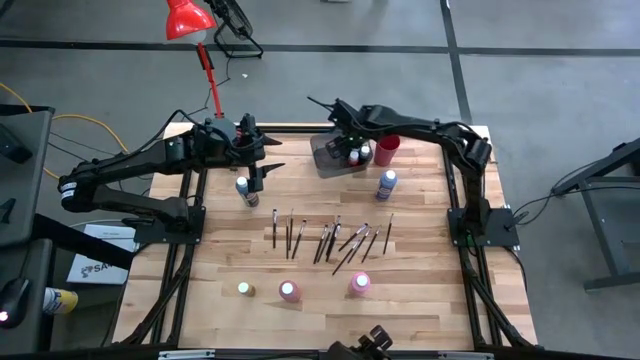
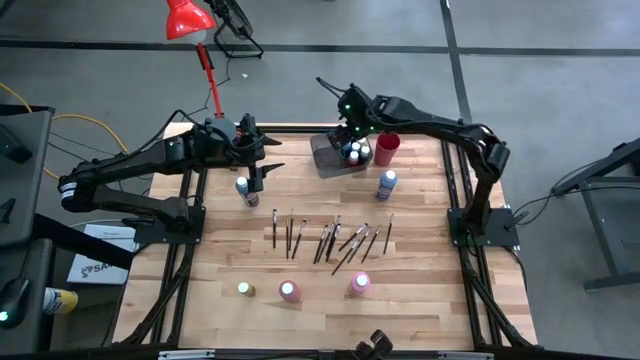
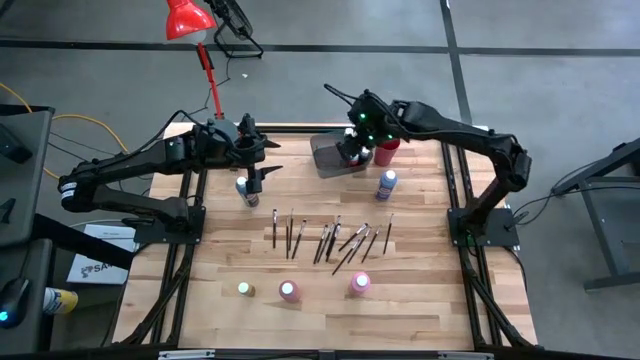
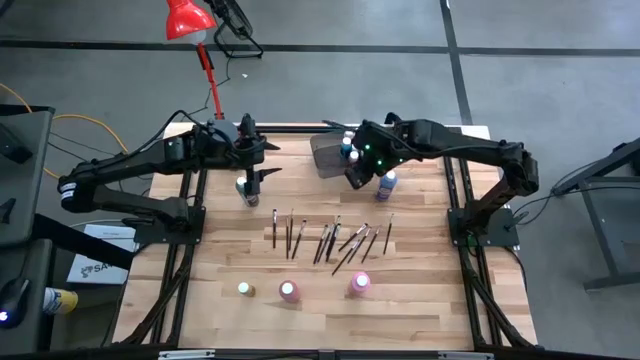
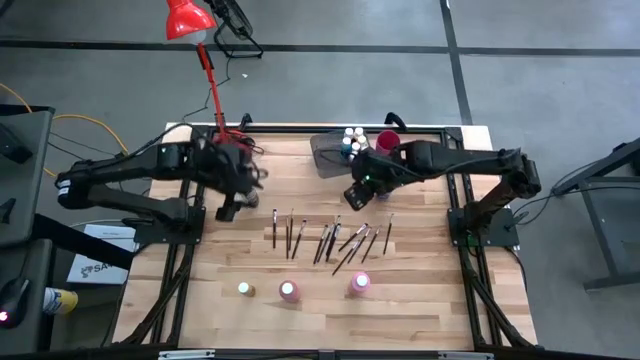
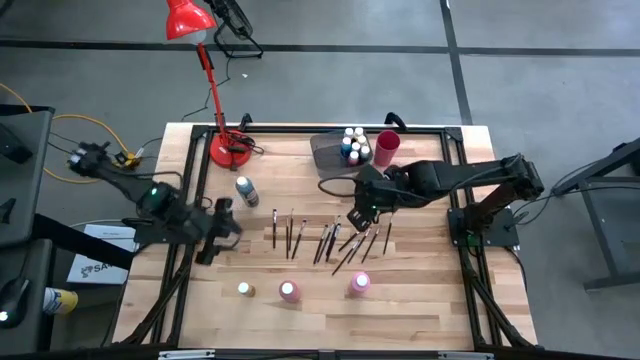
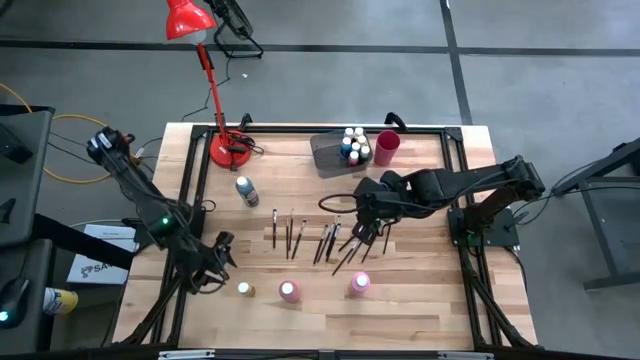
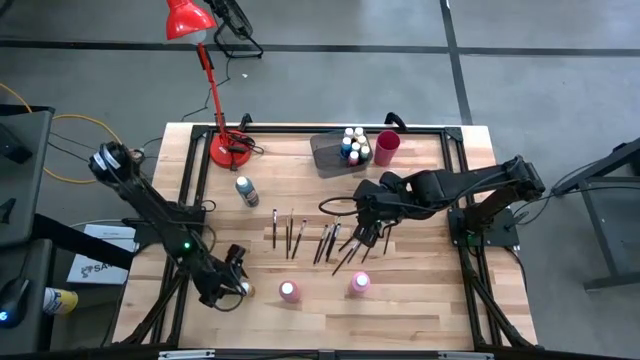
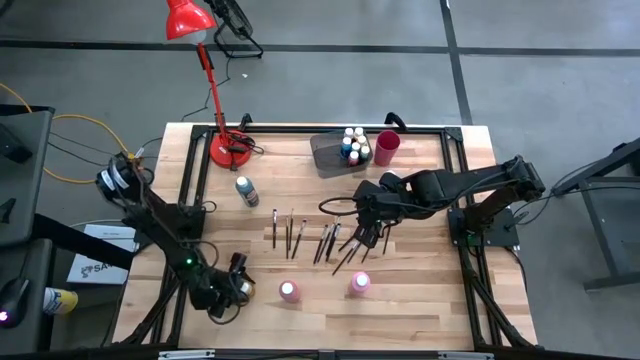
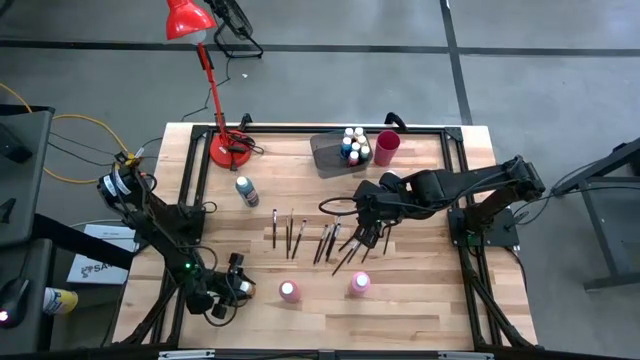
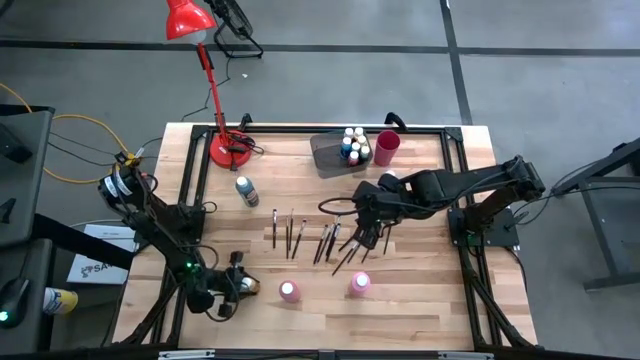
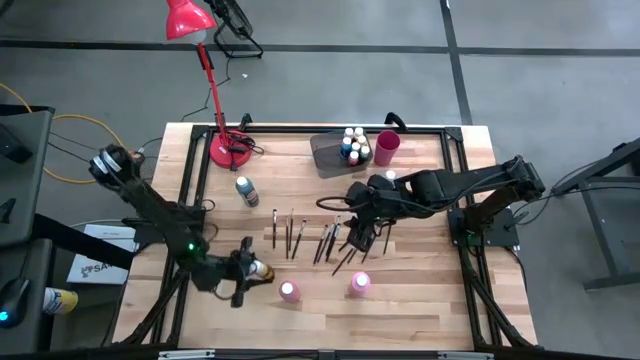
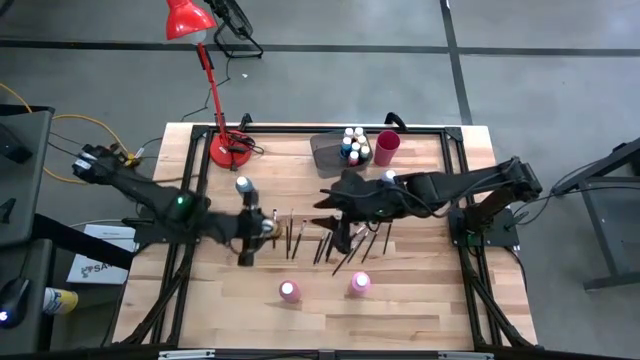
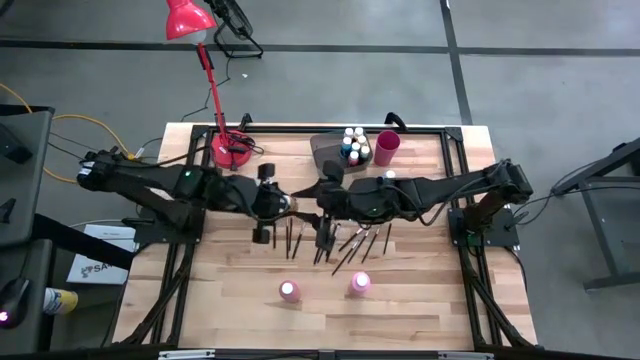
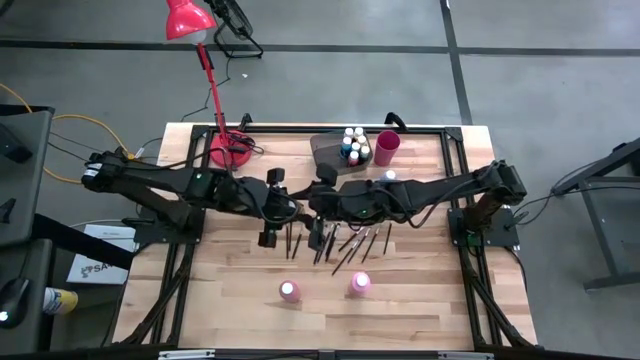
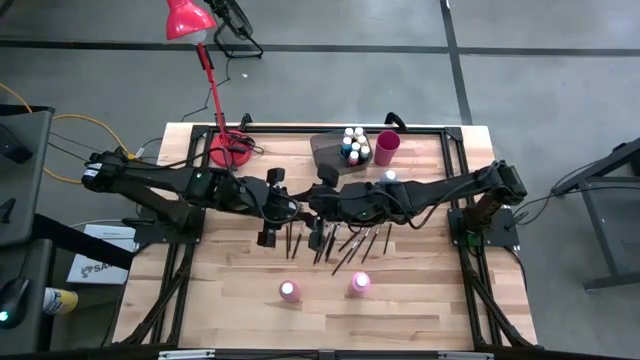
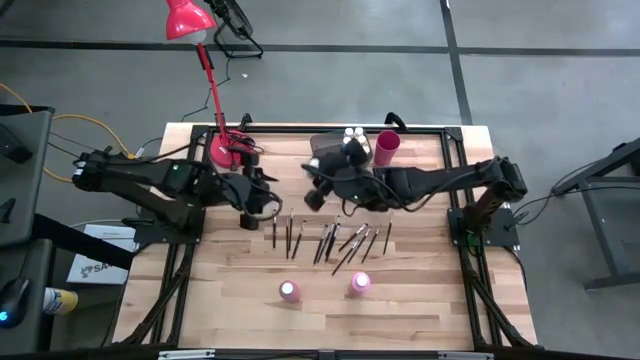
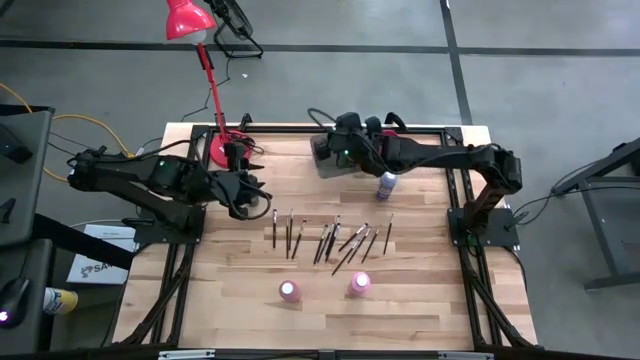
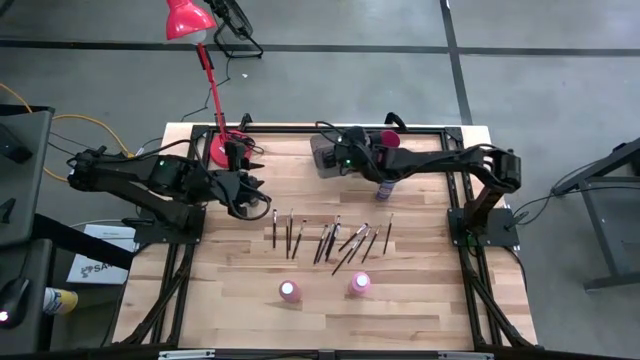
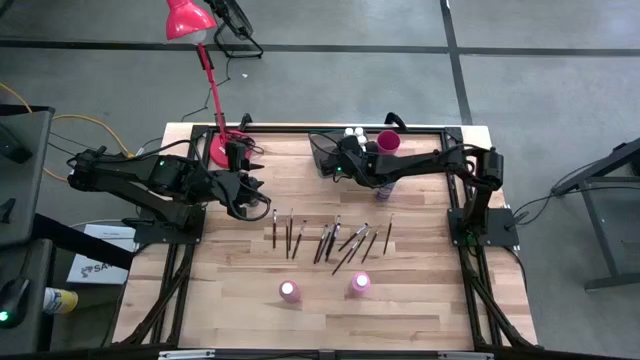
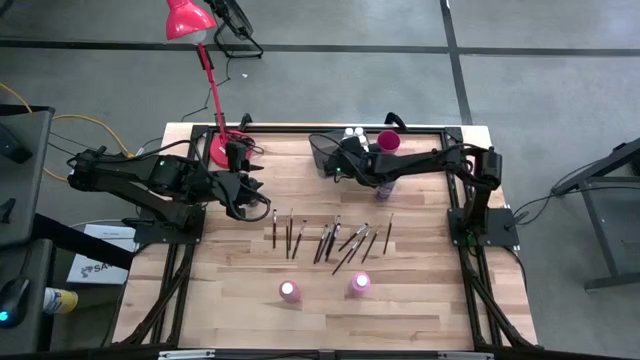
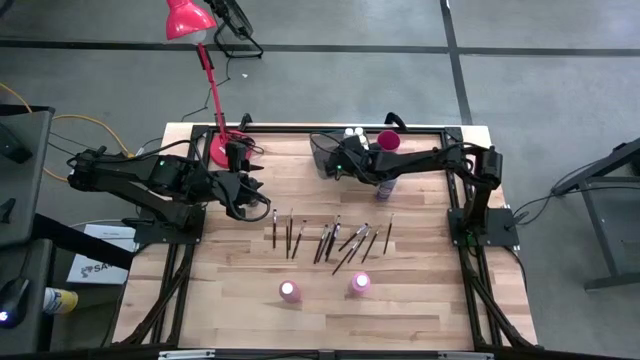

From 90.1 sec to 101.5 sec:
Task: Pick & Place Paint Supplies
Put the small dark yellow paint bottle into the black bin

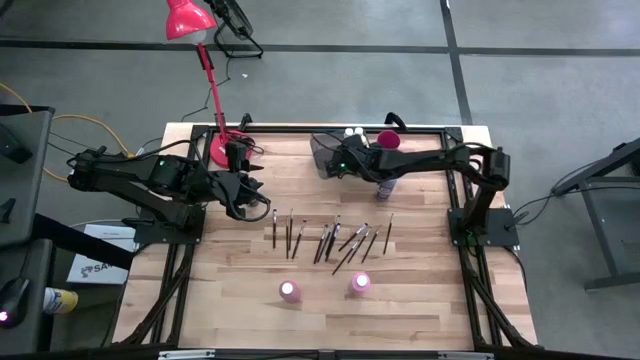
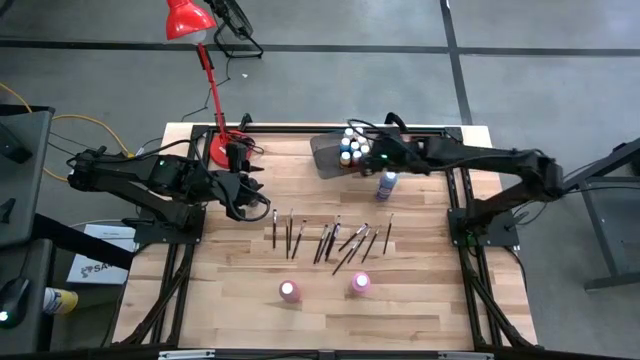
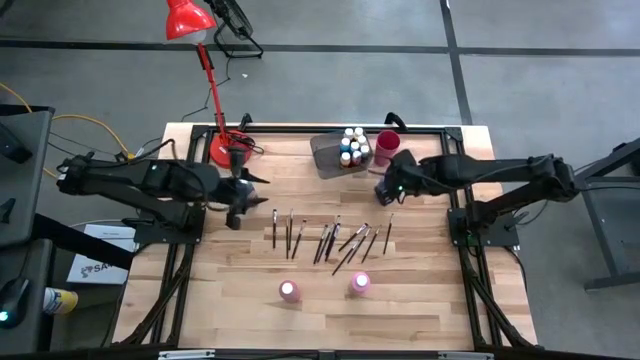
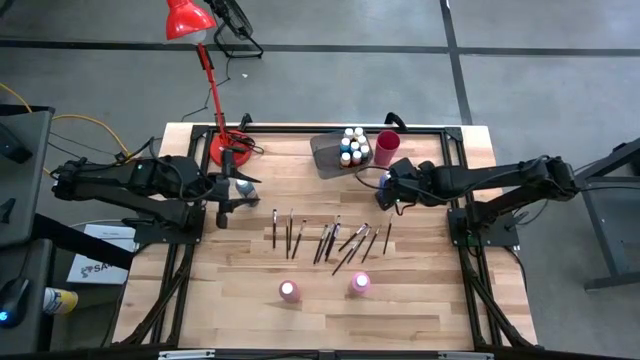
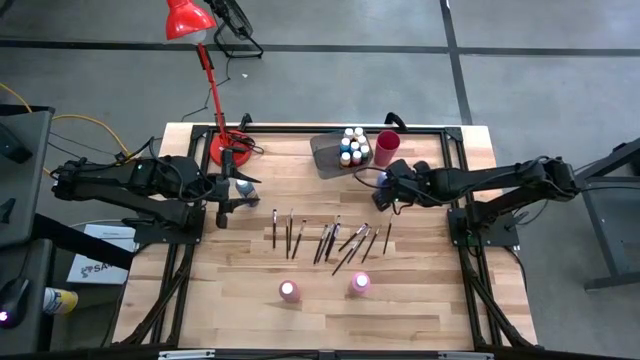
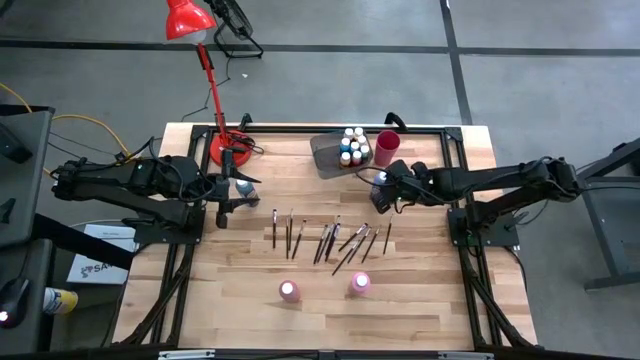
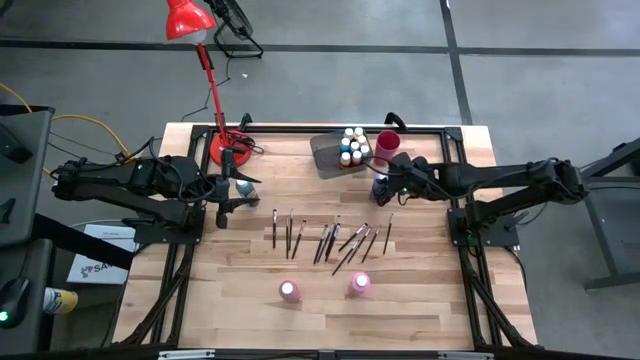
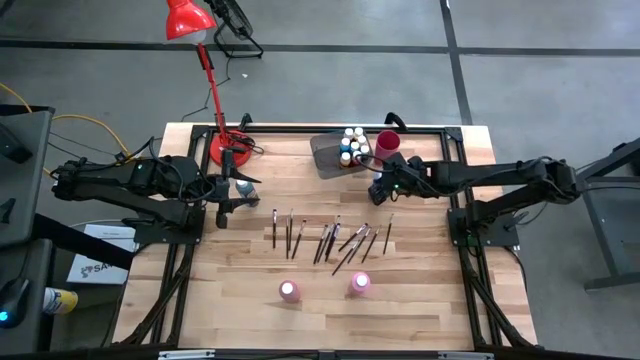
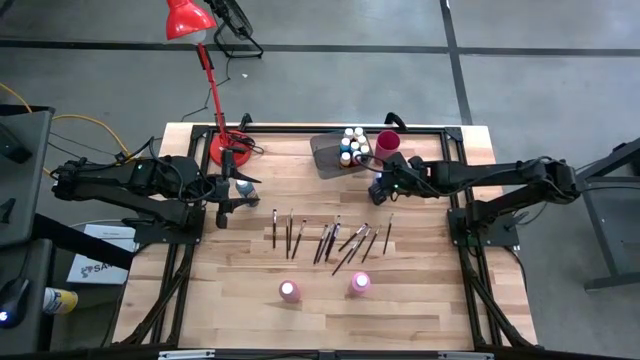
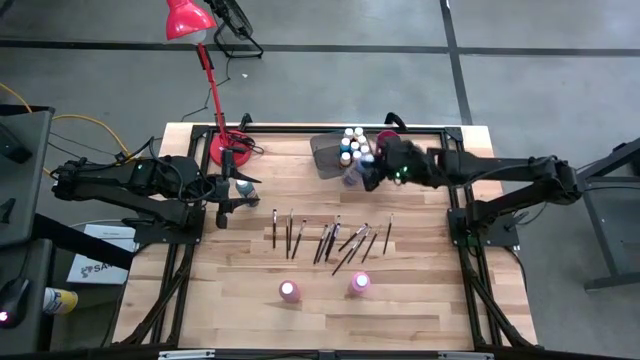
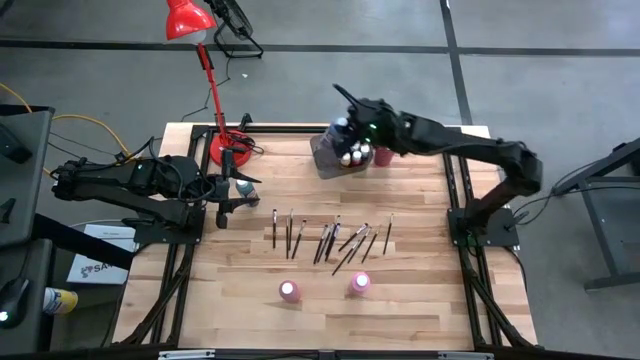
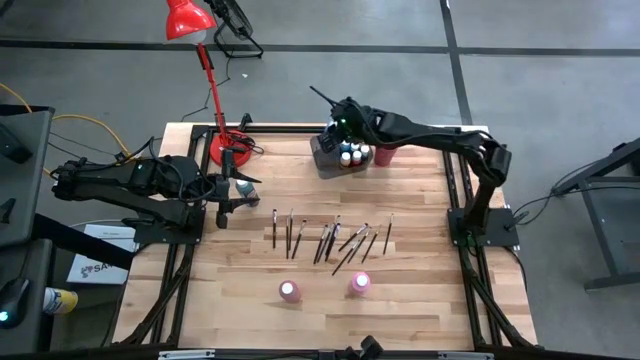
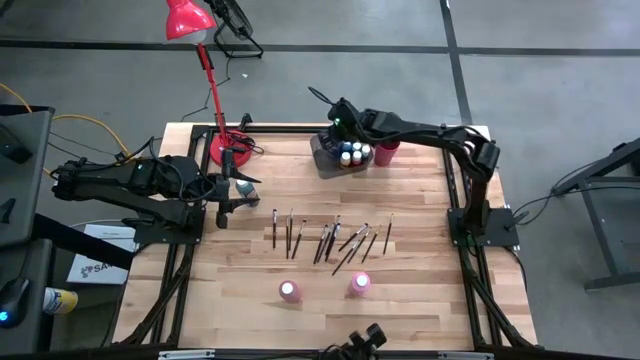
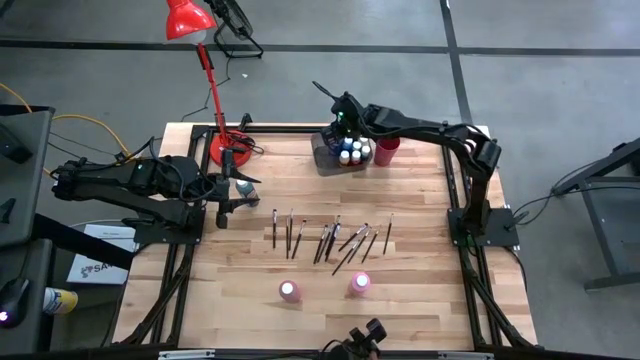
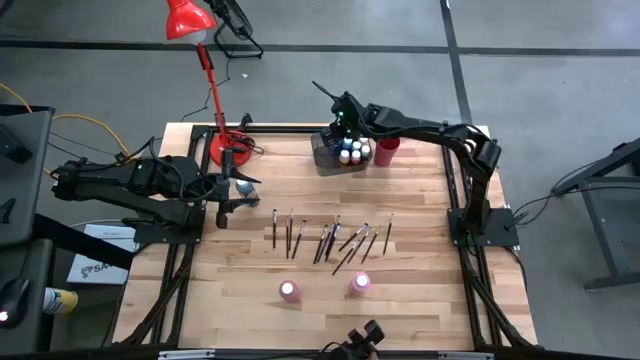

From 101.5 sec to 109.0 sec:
Put the large blue paint bottle into the black bin

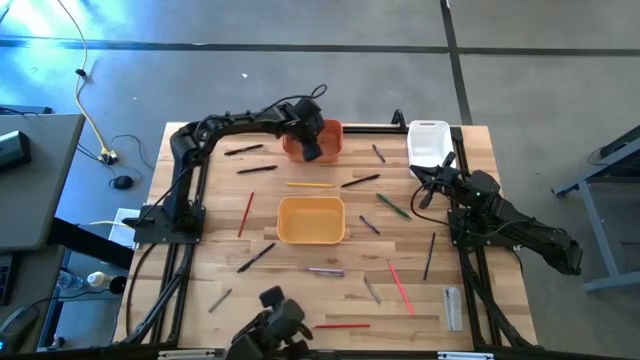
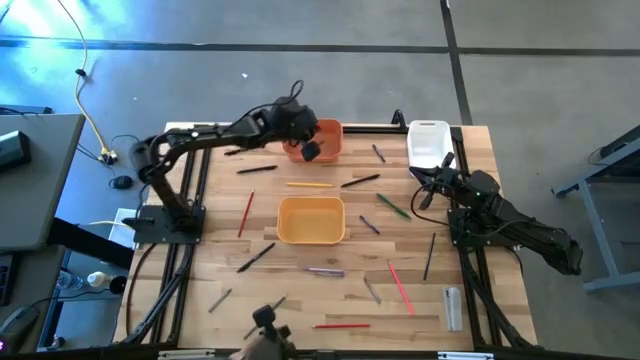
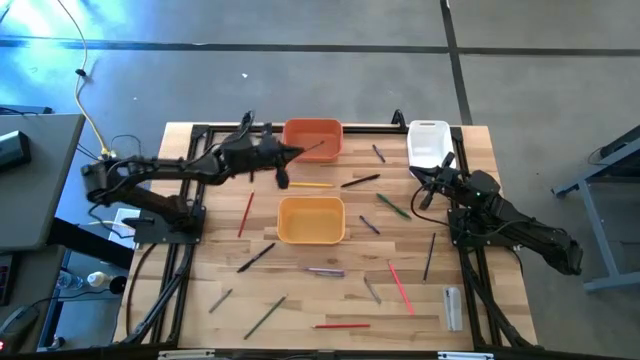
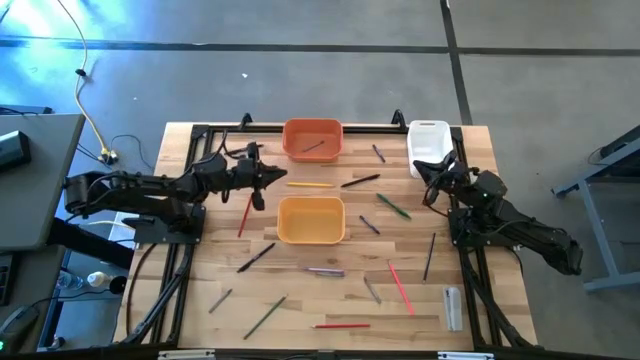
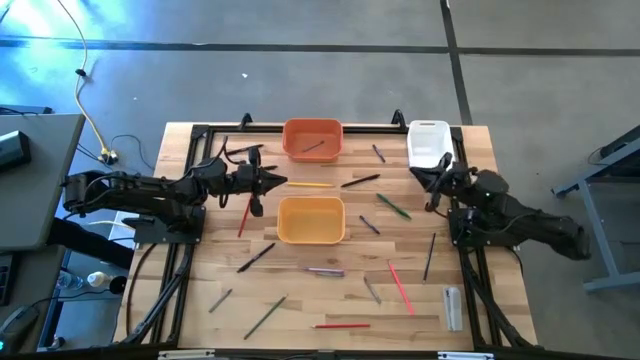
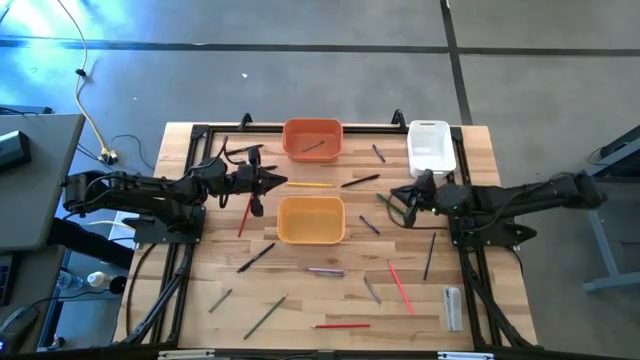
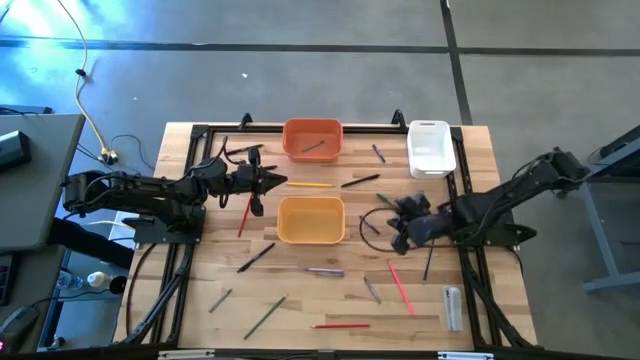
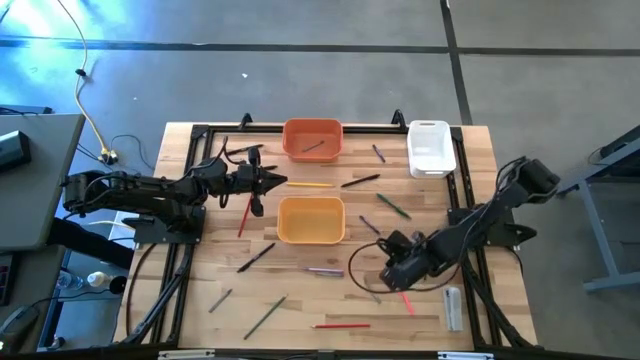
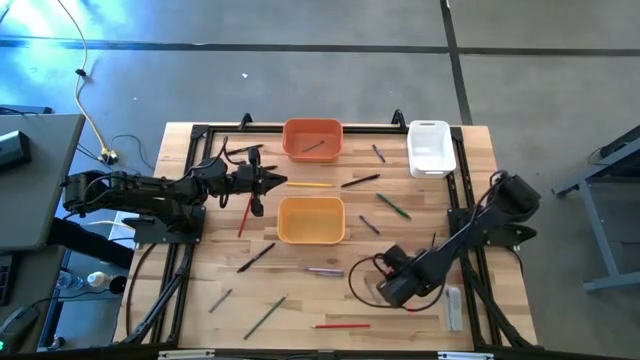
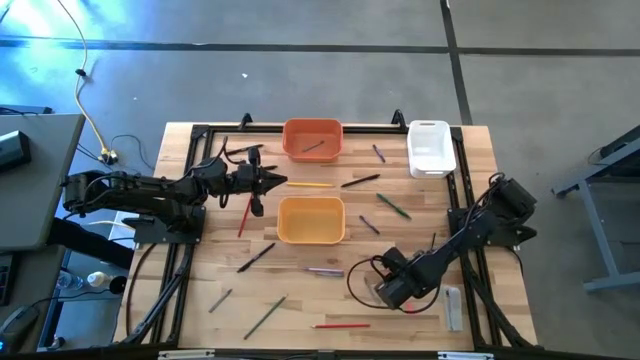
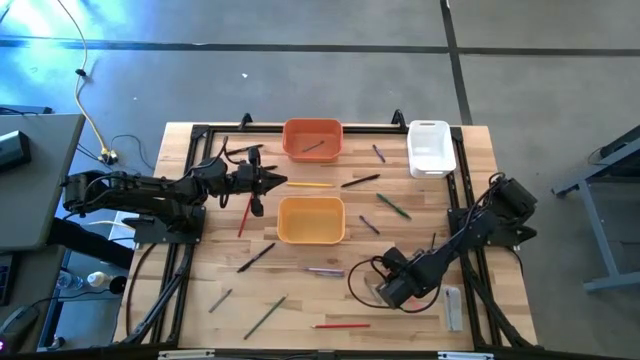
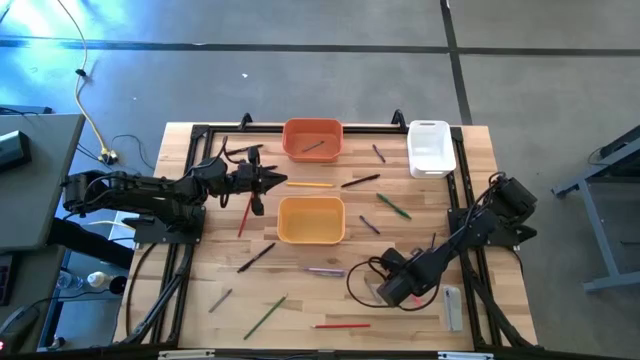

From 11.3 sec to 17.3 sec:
Task: Sort crayons/erasers/pens/pencils in bins
Put the pink pencil into the yellow bin
